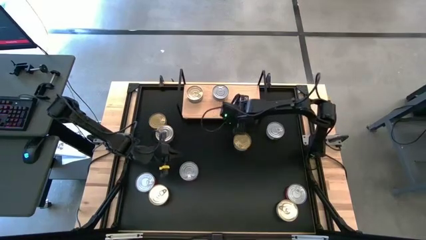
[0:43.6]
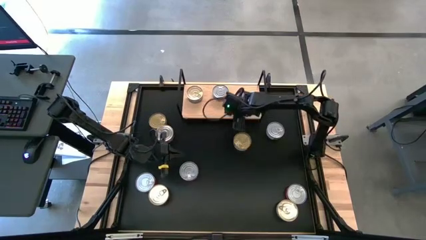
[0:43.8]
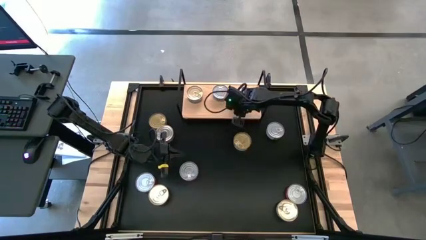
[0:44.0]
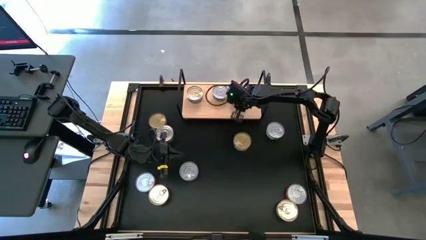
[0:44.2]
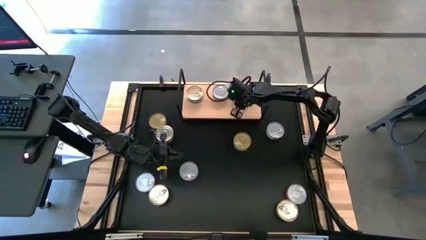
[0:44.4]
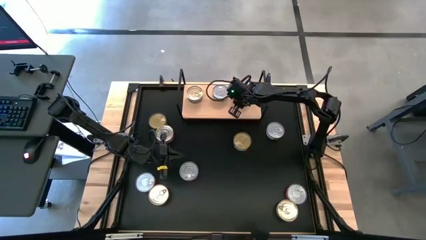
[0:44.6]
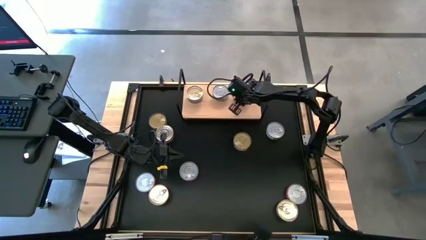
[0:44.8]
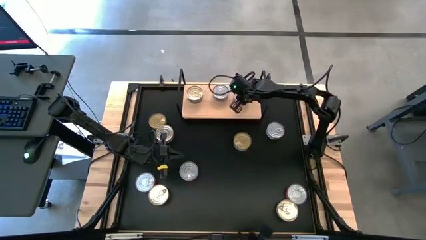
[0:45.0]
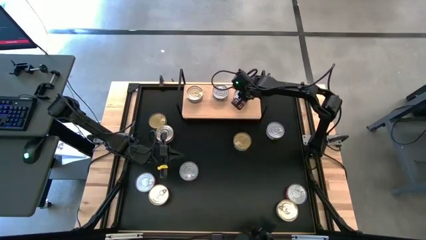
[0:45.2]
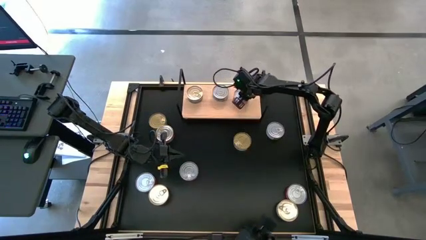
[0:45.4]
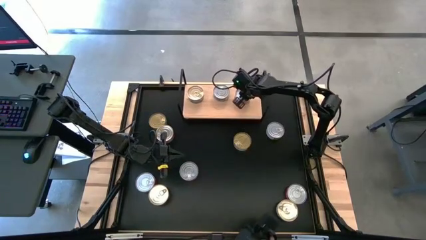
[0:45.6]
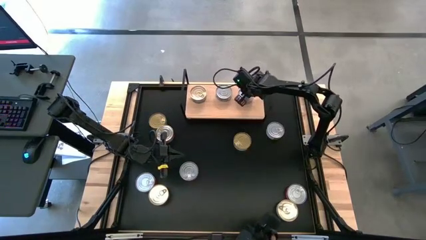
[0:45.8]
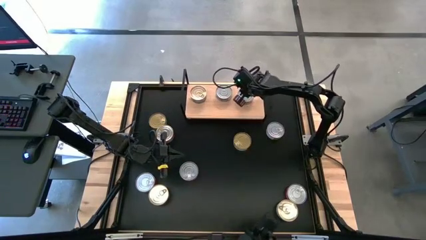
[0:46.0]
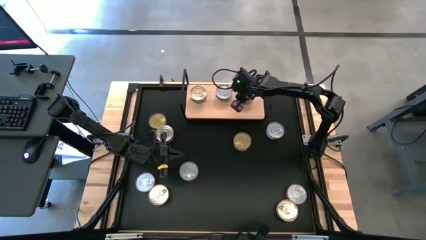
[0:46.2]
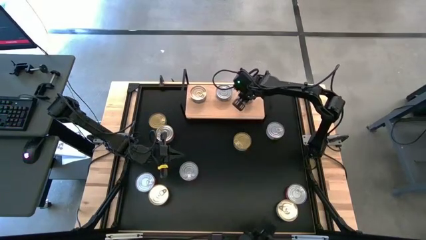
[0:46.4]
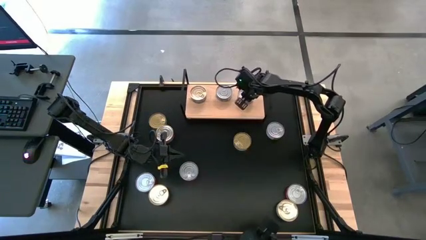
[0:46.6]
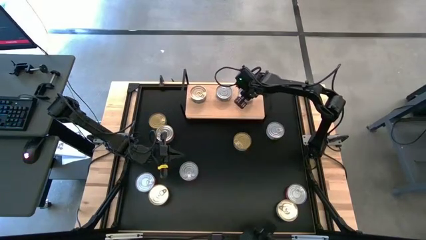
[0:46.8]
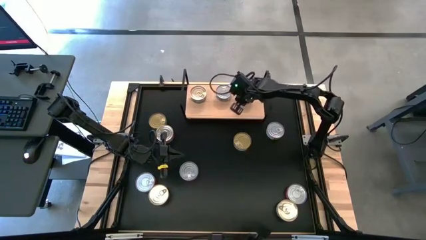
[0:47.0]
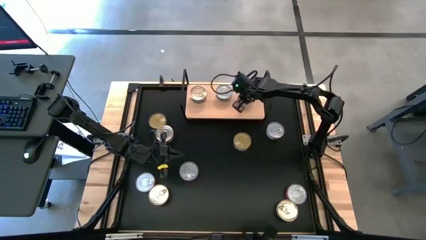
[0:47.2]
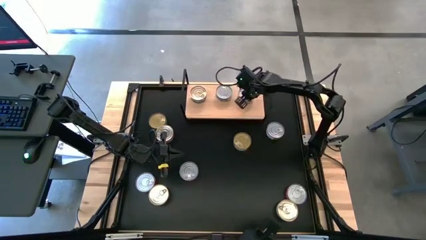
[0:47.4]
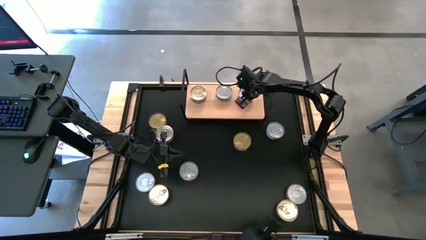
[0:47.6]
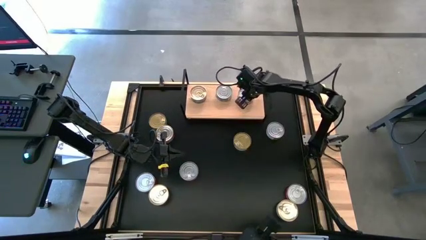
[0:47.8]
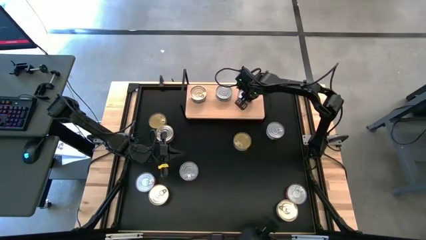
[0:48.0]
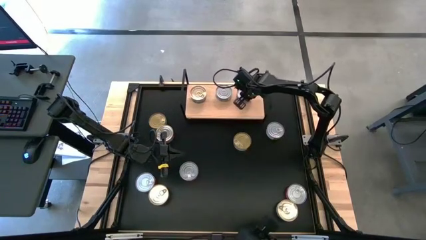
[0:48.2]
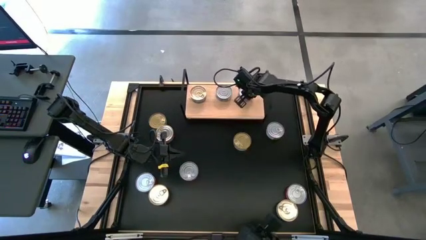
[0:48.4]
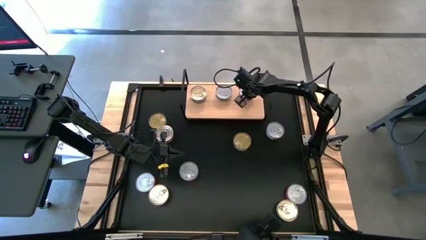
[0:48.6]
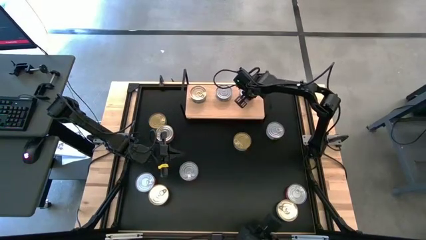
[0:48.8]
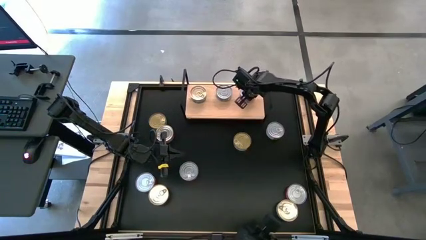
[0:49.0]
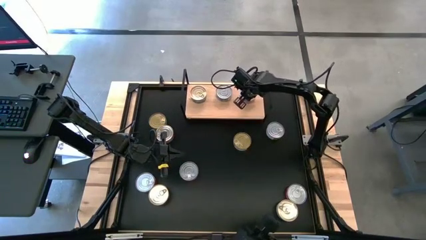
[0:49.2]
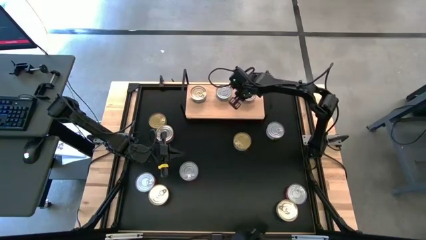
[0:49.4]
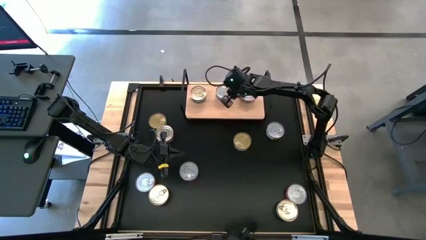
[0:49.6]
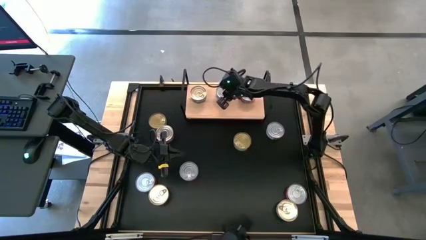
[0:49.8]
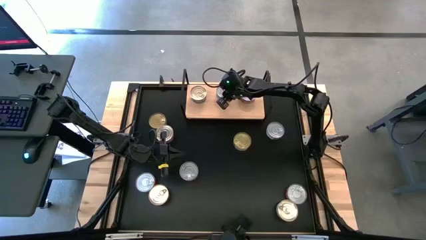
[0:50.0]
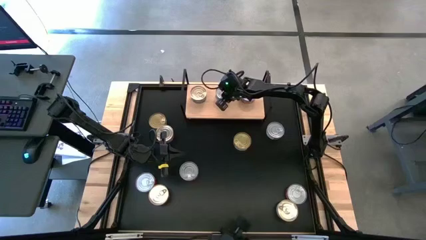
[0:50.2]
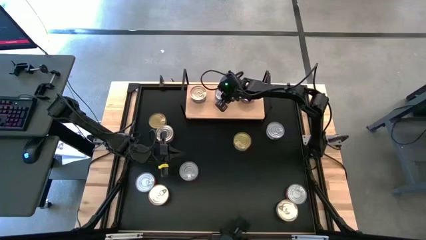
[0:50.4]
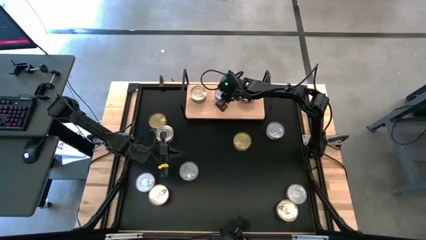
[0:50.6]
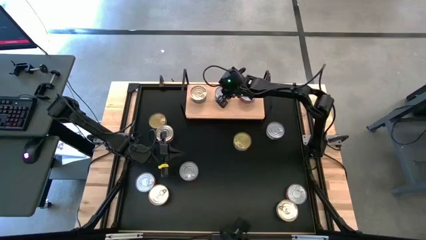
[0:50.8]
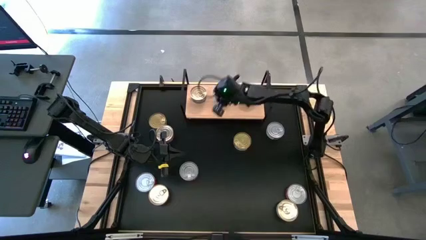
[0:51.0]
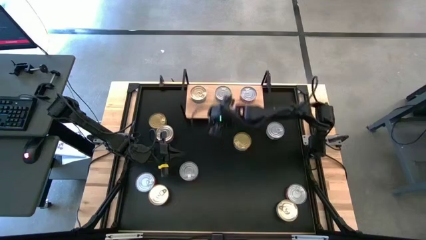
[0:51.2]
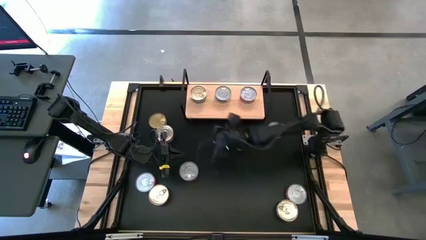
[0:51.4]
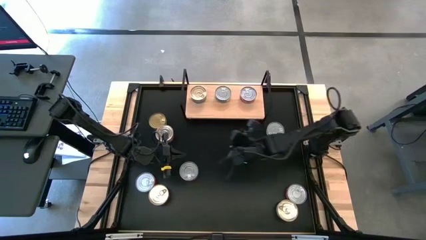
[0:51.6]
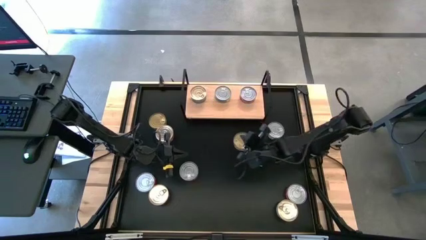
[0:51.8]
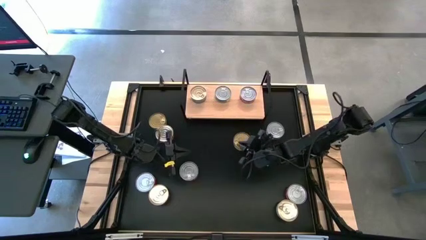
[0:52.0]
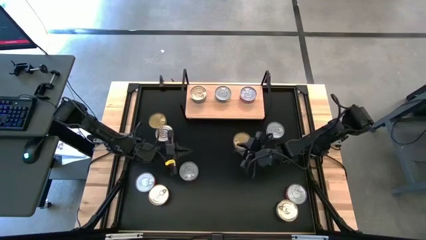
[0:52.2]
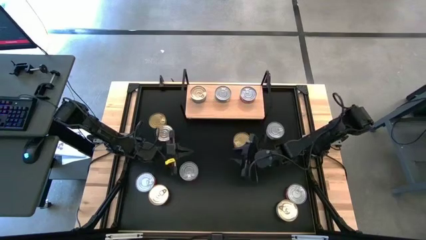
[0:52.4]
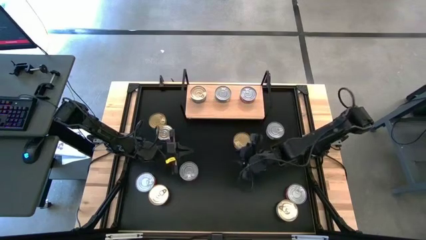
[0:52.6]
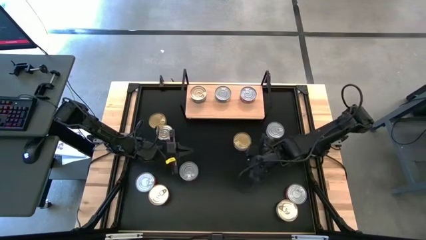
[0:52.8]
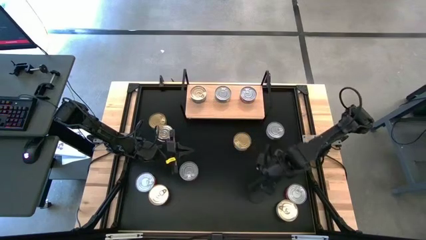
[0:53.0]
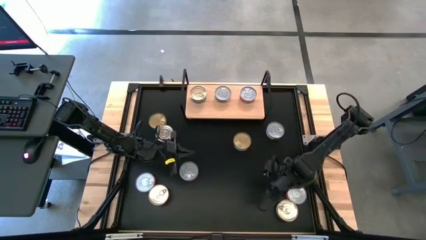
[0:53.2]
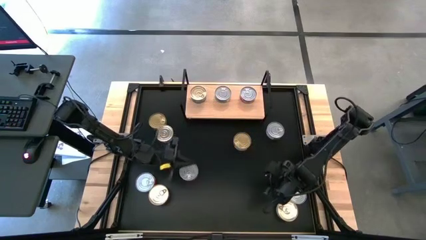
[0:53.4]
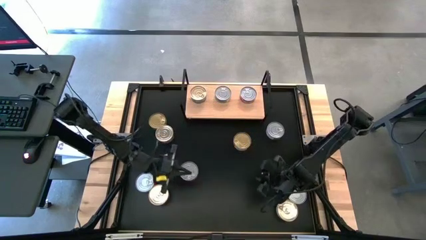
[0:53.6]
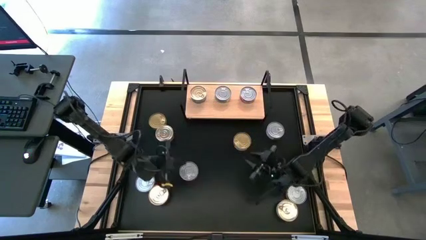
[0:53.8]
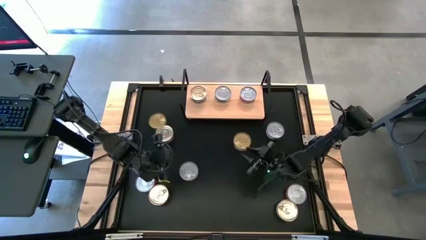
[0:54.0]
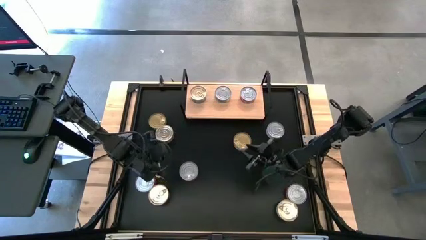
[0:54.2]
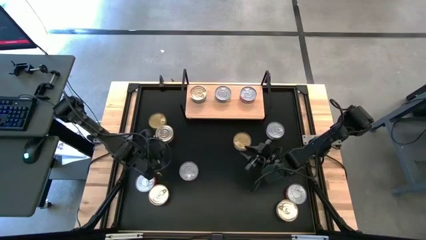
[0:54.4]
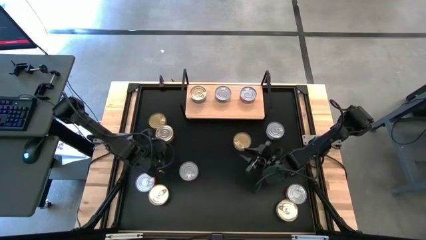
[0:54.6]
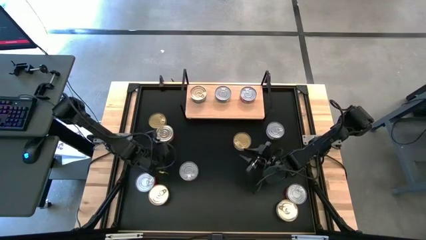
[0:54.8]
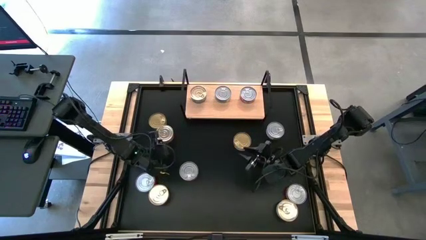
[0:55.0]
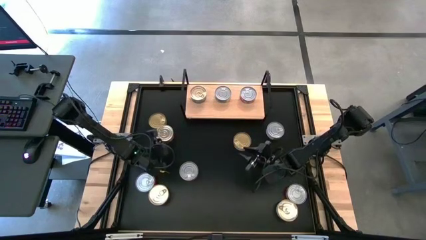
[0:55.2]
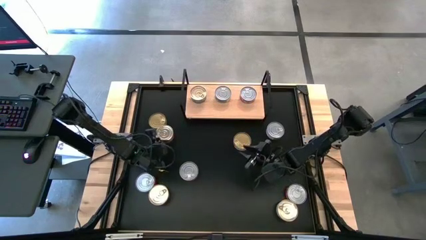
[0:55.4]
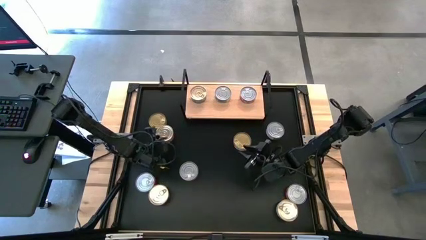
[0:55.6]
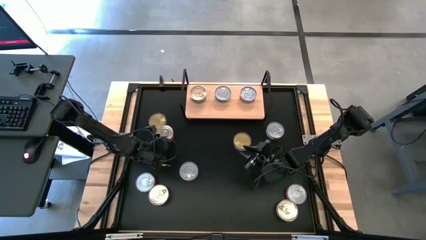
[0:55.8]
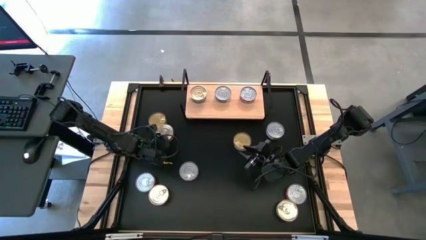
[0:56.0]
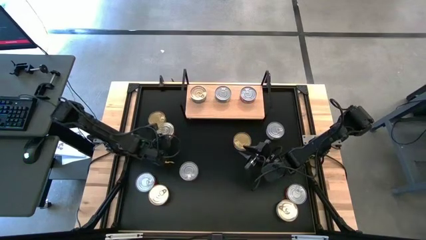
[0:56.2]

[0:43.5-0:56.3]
Task: Stack canned seafood by type on shelf
Put the top left blue canned tuna on the lower right shelf

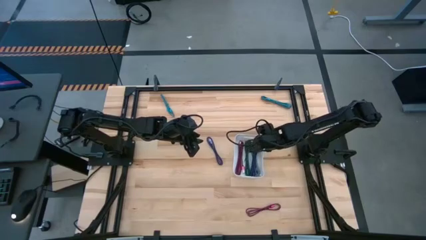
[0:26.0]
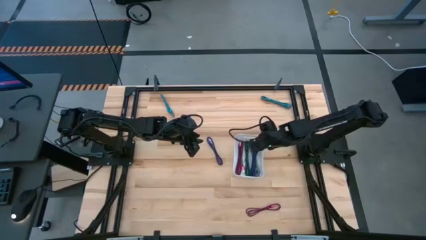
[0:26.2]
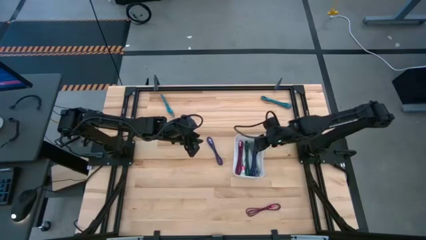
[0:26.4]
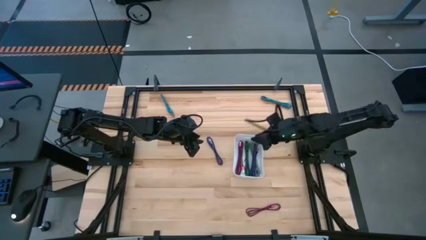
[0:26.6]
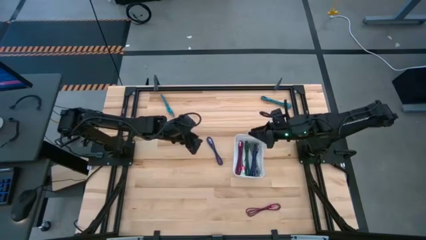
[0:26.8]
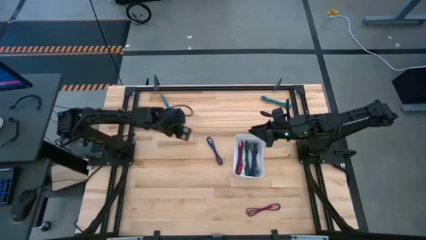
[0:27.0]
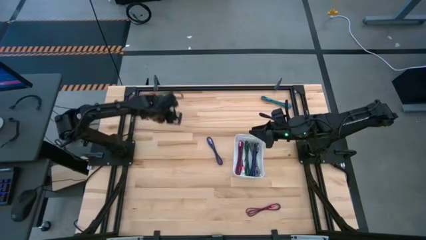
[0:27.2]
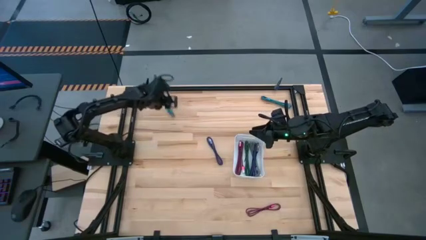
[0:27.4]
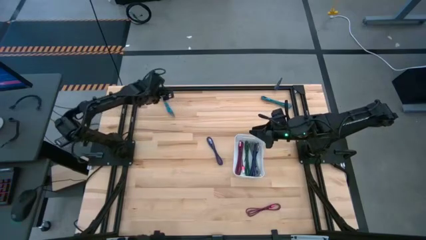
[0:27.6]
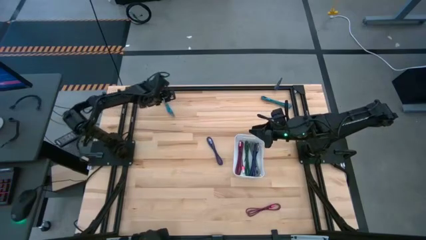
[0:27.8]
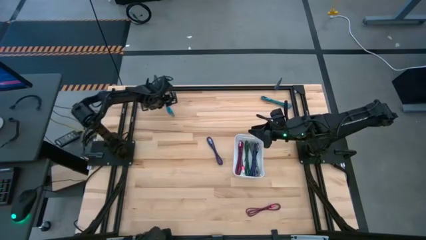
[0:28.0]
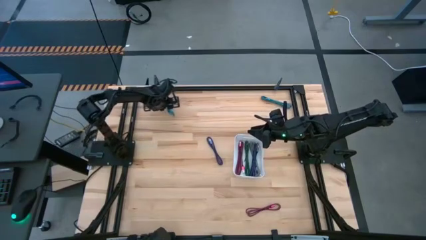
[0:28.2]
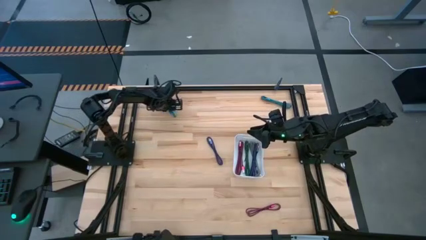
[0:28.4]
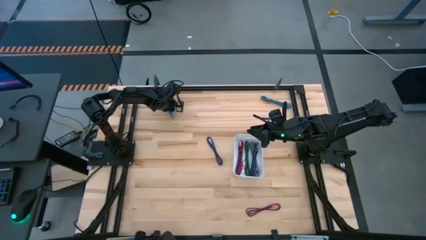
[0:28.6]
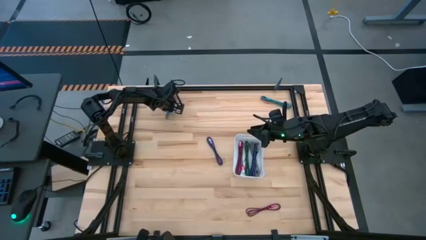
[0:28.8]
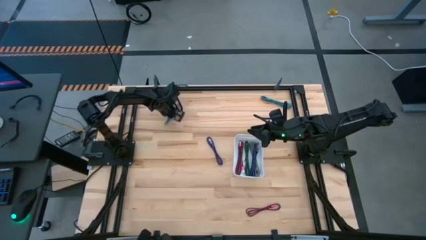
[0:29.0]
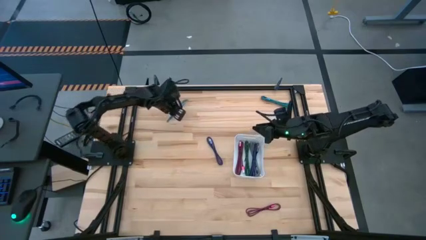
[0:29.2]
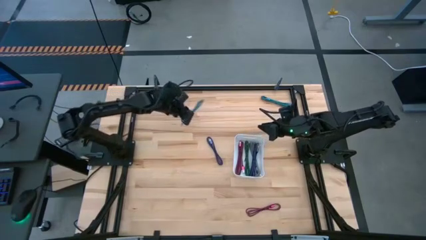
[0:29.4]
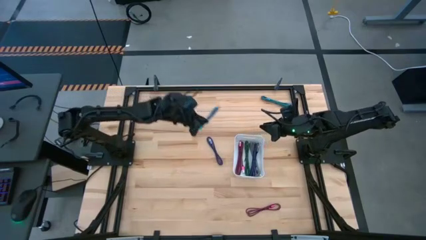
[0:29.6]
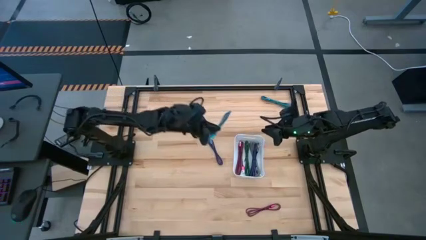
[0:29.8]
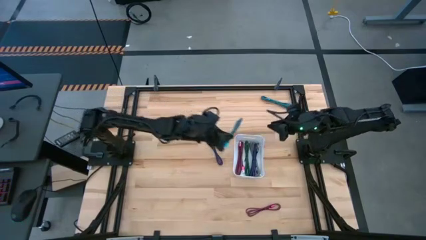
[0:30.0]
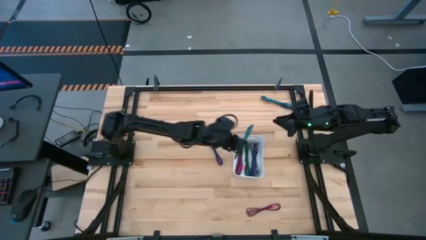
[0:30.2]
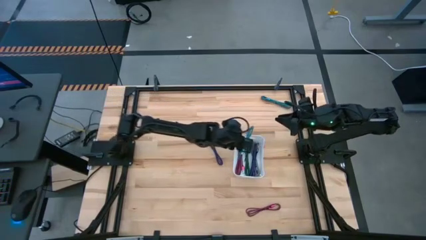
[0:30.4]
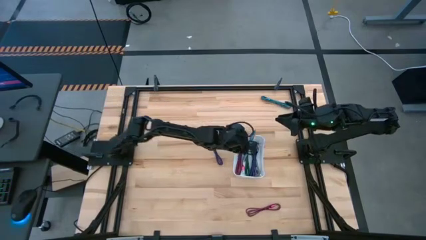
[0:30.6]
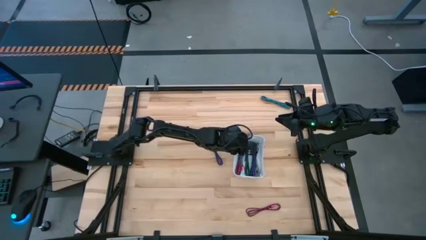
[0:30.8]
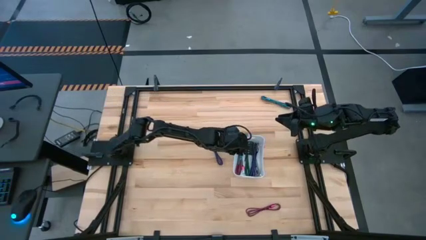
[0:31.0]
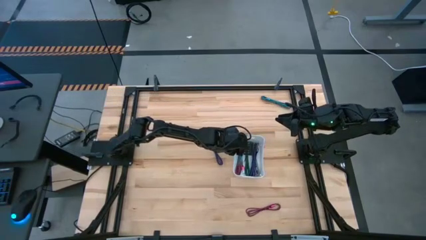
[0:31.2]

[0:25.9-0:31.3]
Task: Pick and place USB-C Cables
Put the left blue charger cable into the white bin
